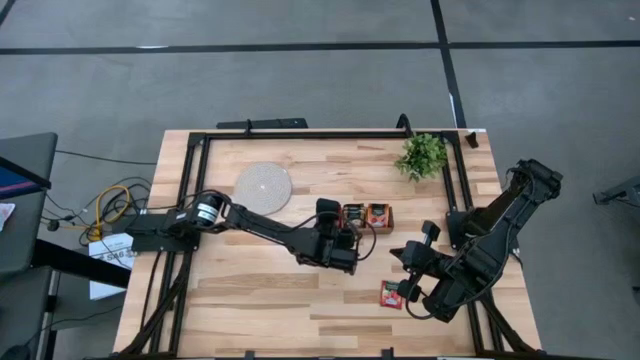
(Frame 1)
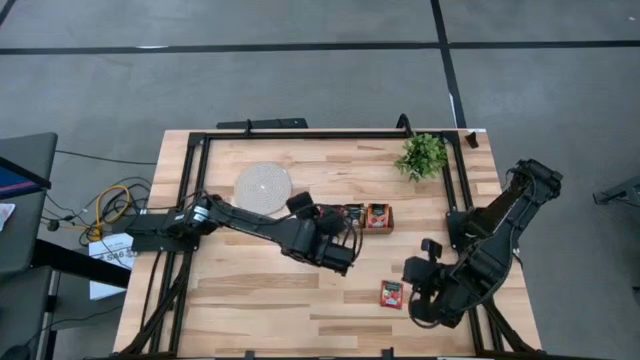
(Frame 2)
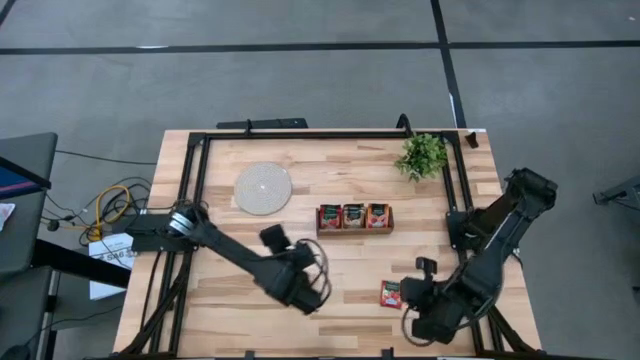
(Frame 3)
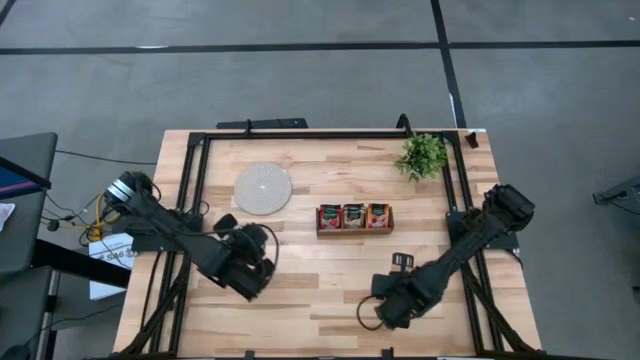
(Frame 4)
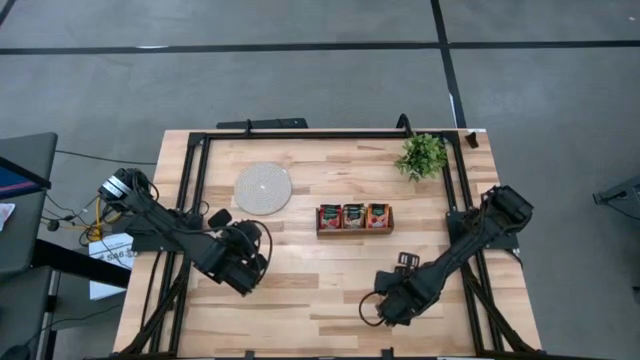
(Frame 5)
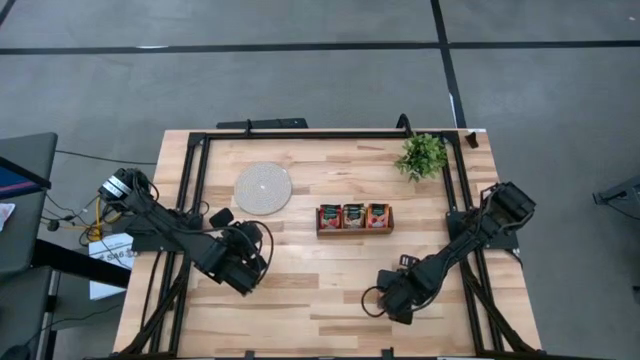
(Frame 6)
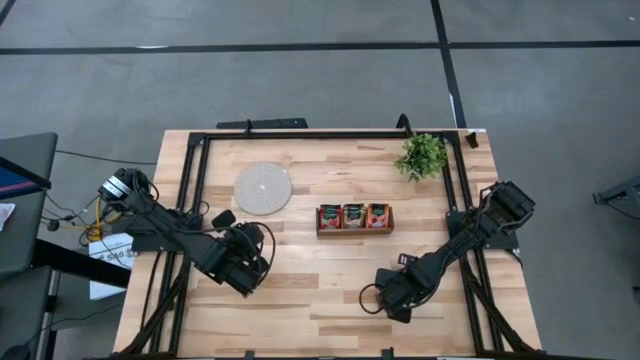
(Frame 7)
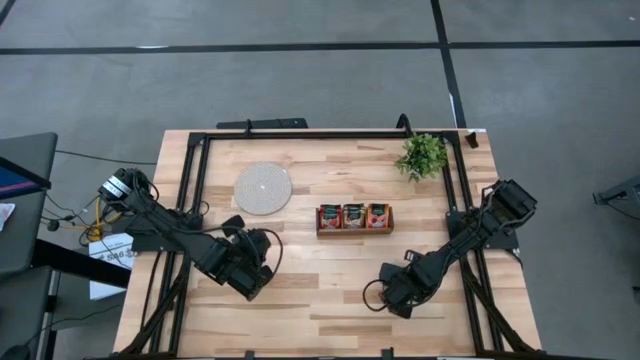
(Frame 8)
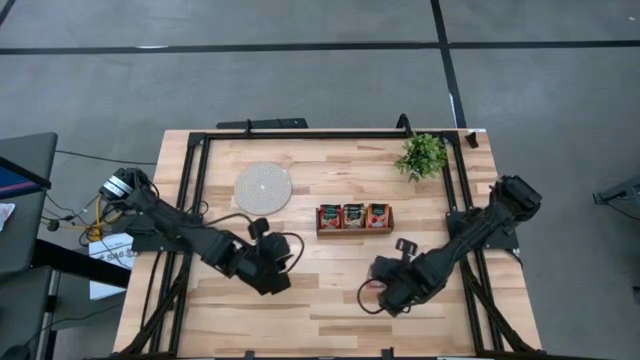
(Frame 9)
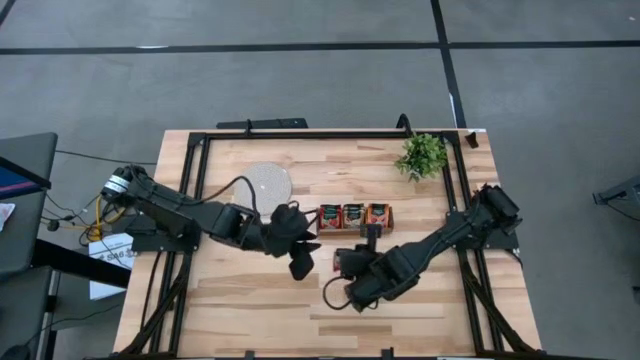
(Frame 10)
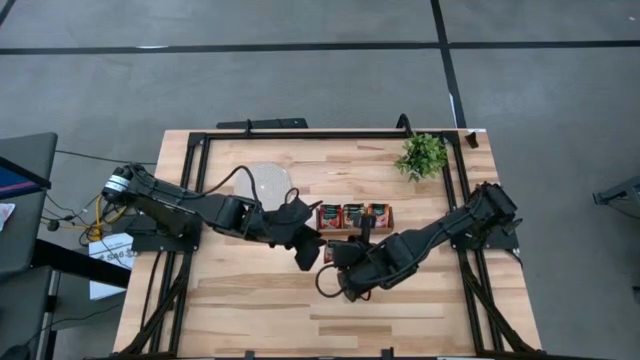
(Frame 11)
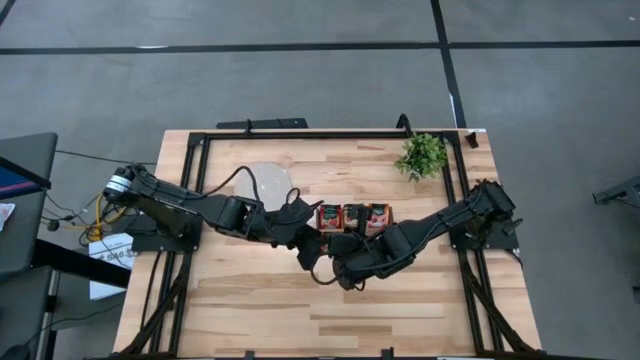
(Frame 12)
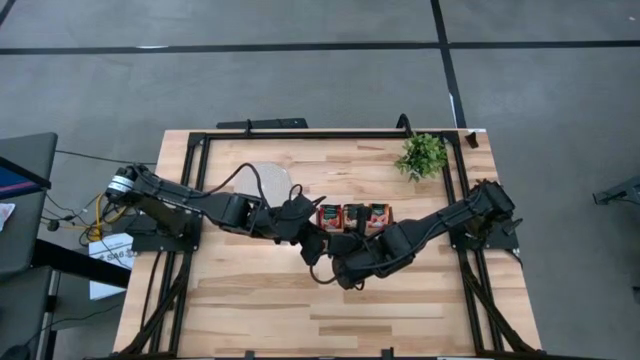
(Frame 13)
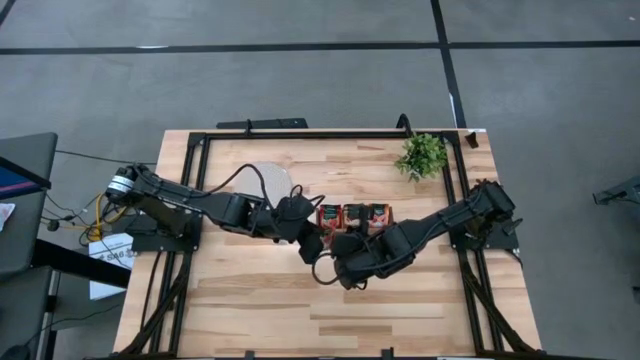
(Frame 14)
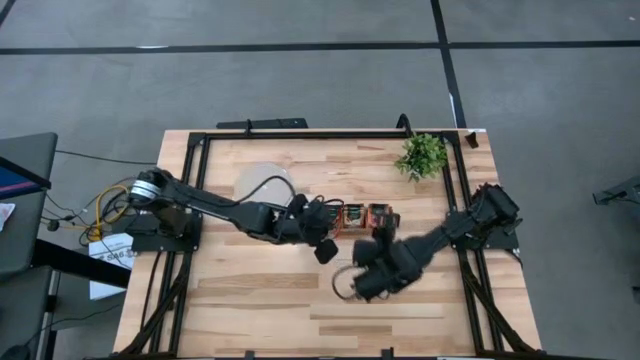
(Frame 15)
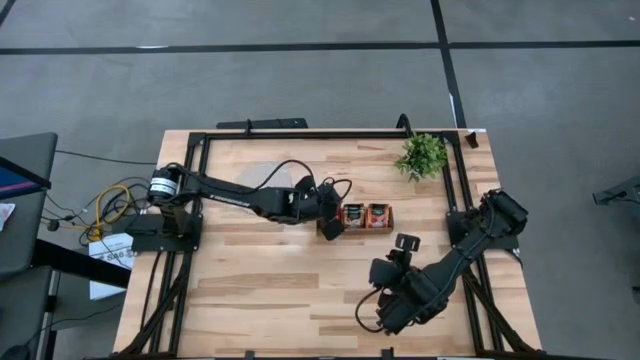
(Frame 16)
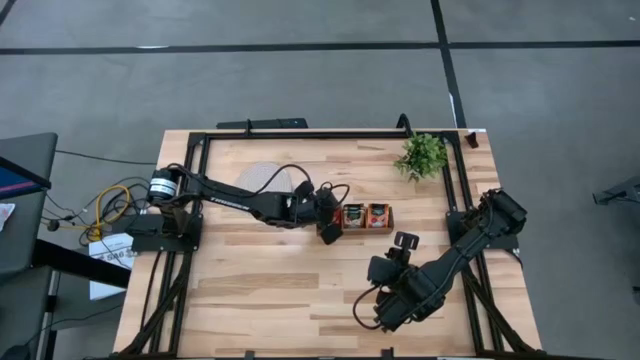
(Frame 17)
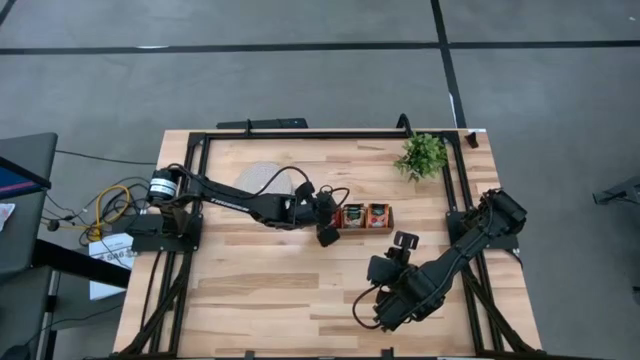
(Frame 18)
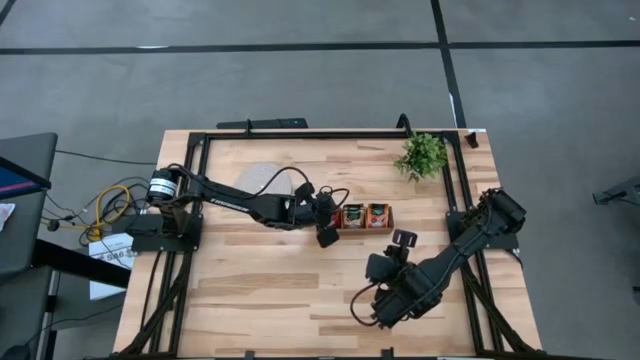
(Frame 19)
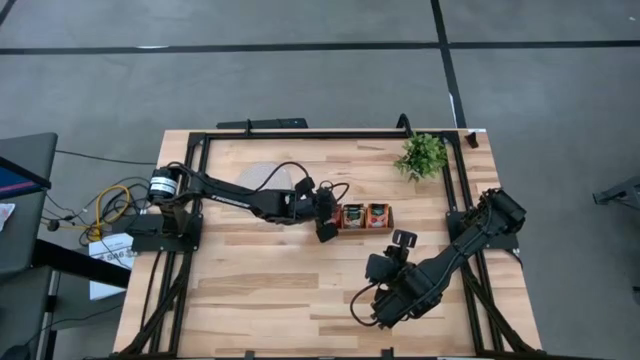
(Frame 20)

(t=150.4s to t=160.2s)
Task: Pick & Place Tea
Put the red tea bag into the left section of the wooden organizer

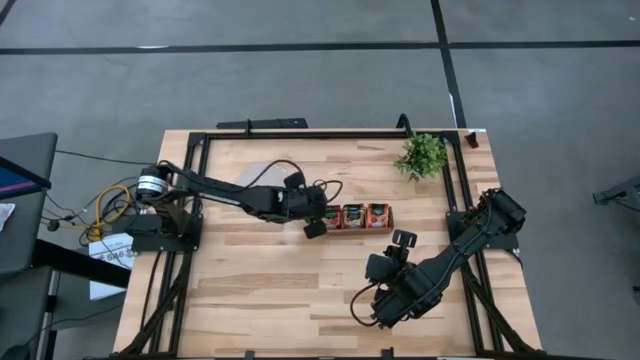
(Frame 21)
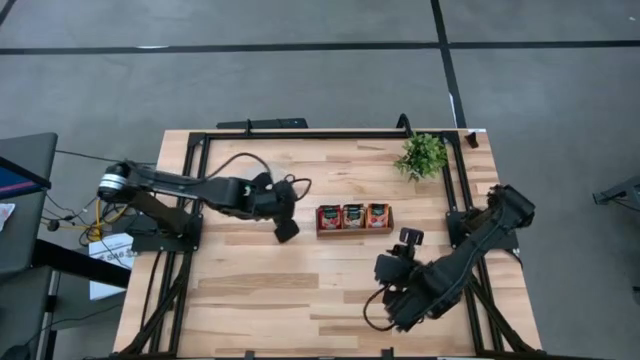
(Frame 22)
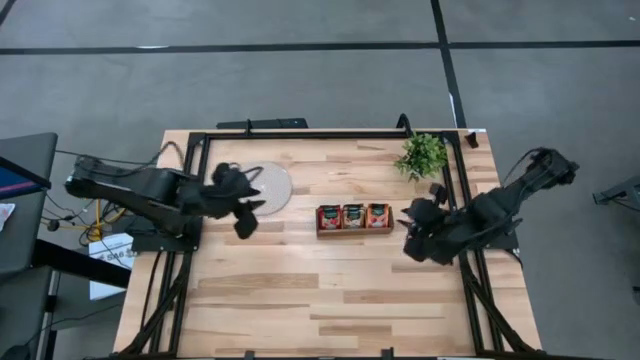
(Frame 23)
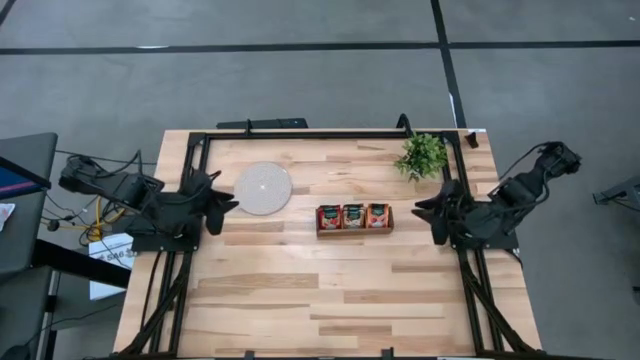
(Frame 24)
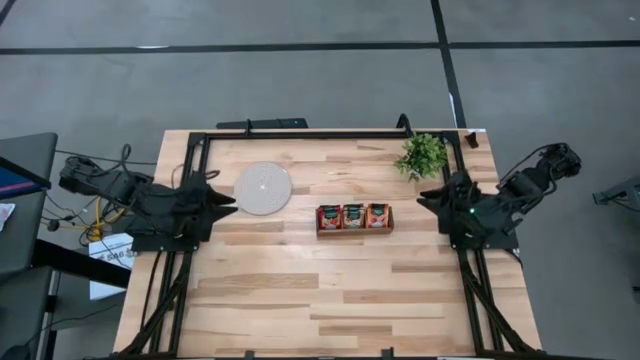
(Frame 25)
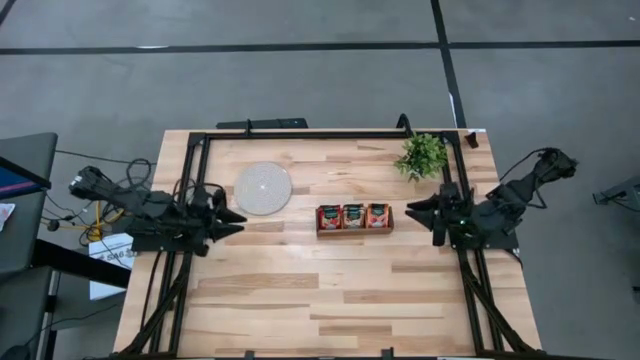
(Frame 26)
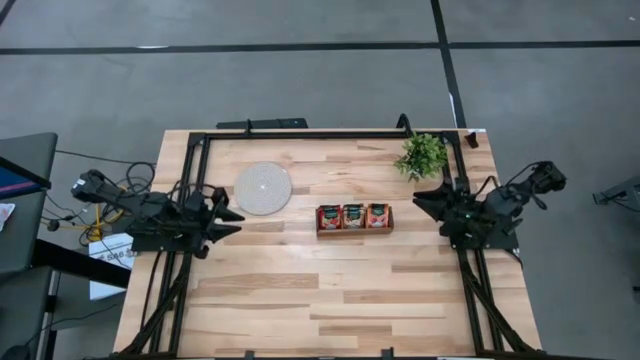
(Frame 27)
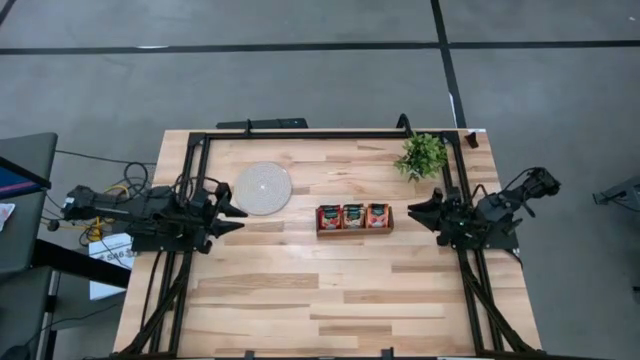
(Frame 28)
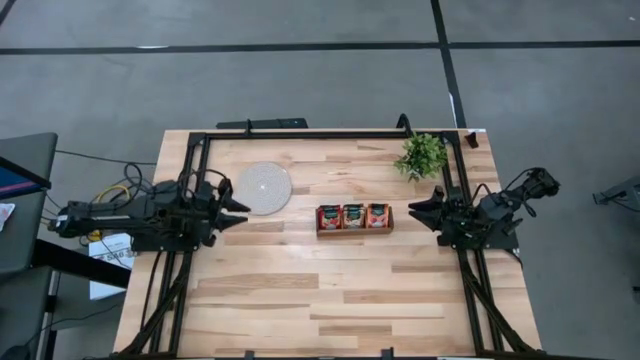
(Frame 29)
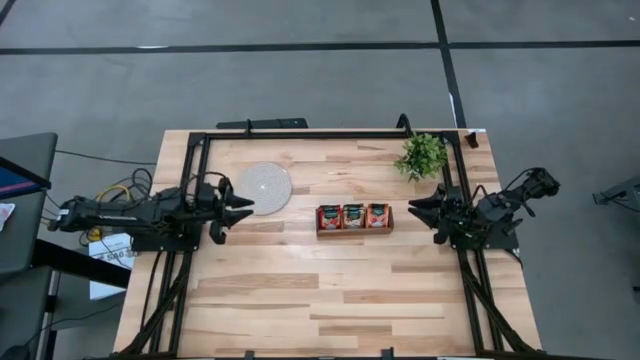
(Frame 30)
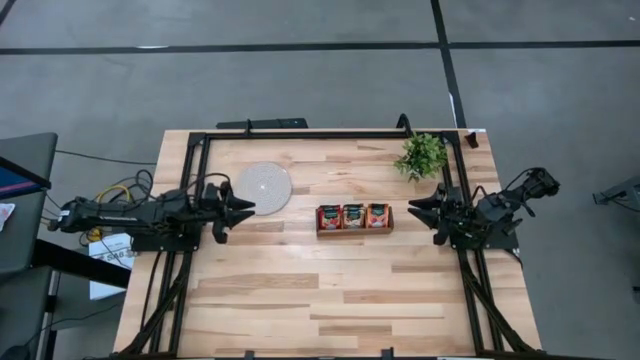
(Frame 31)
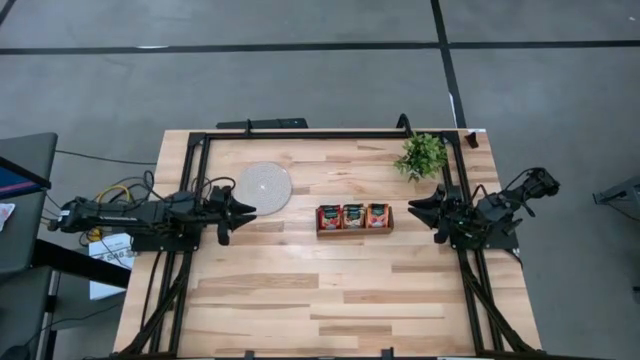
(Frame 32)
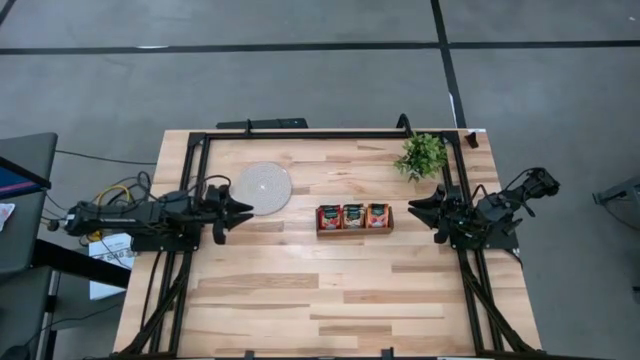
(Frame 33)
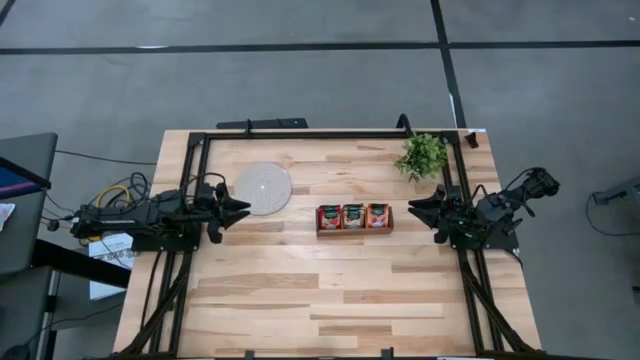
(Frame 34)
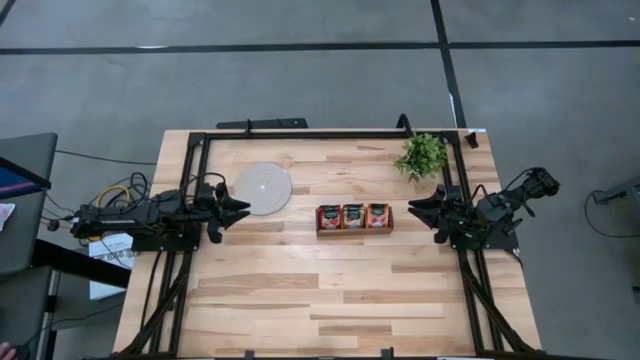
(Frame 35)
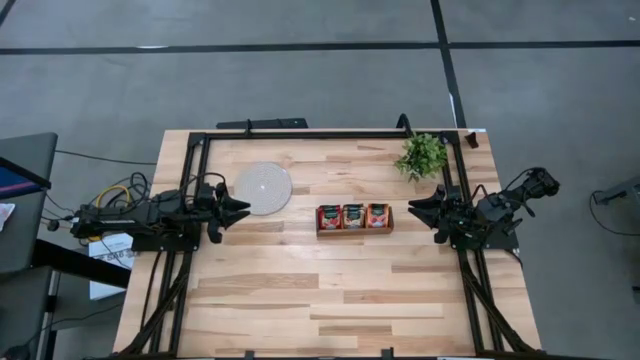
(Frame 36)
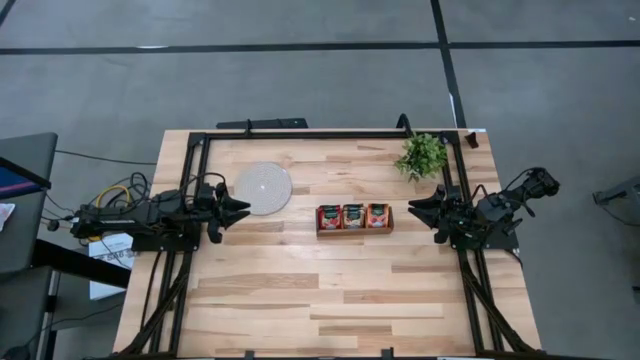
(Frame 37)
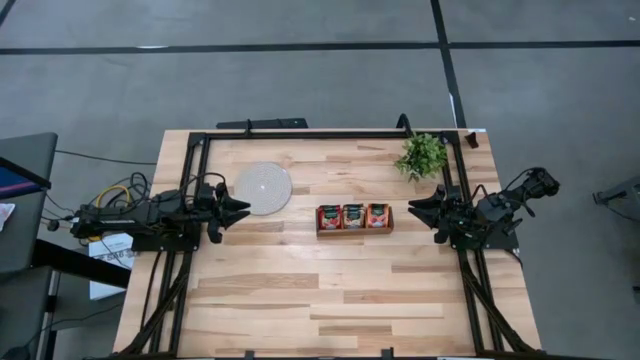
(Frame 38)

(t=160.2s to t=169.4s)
Return to Home Position

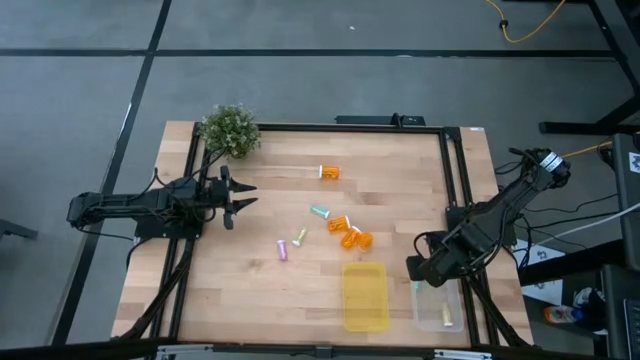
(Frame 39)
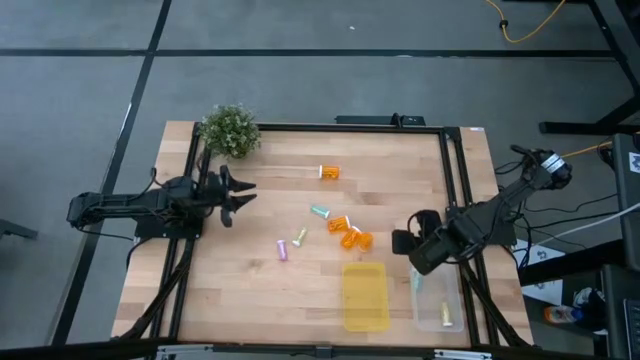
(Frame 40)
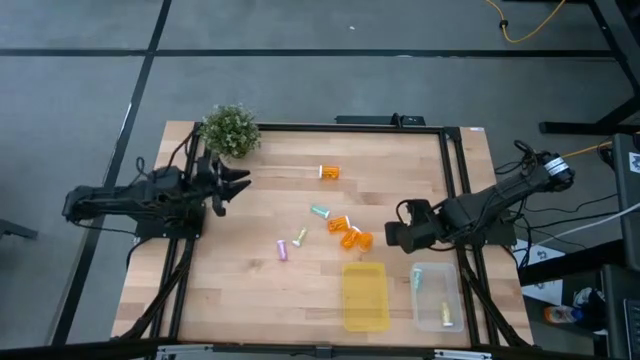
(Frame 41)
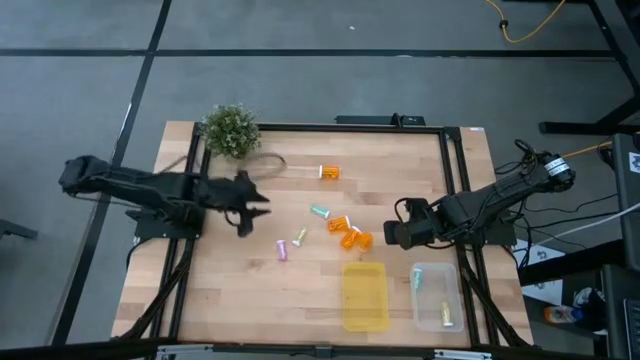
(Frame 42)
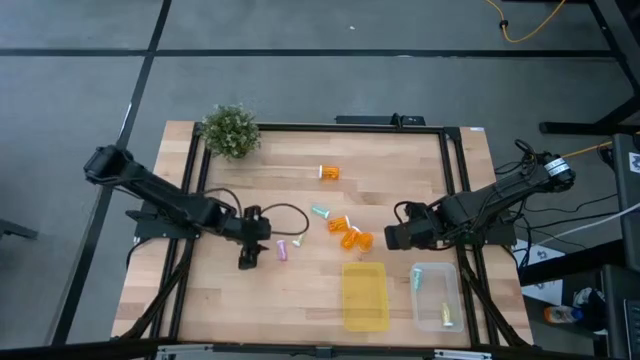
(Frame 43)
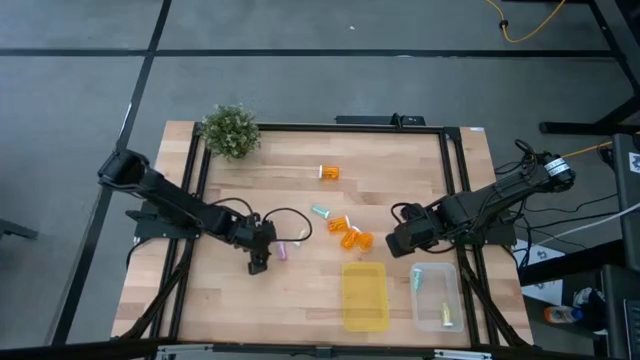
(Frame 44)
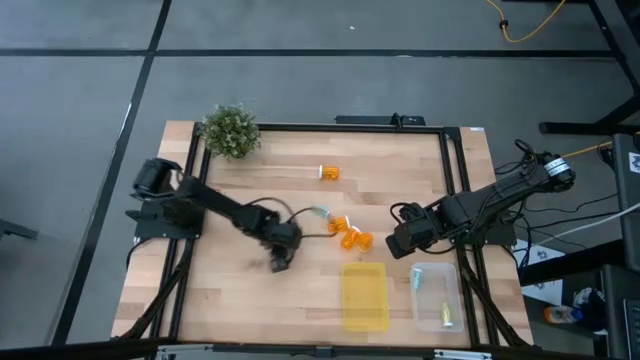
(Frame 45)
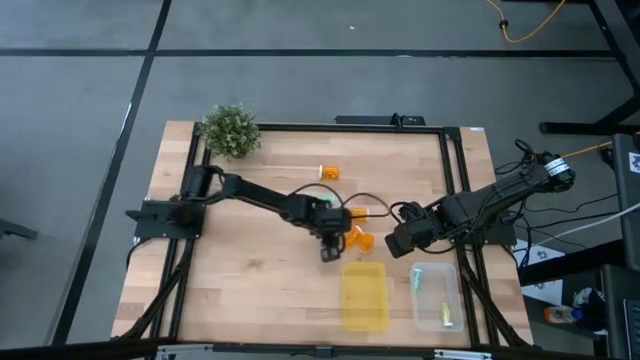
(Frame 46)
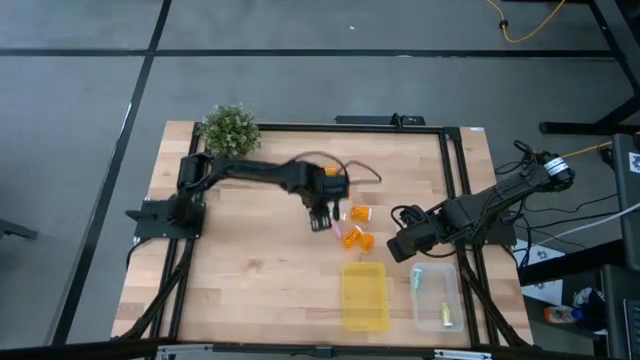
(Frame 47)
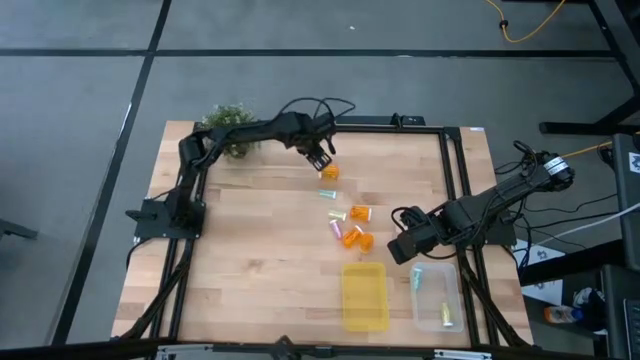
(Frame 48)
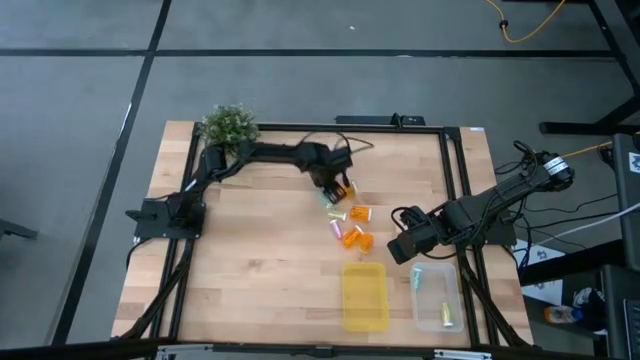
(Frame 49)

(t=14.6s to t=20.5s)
Task: Pick and place medicine bottles into bin by pill shape (circle, oval)
Move the pills to the center
